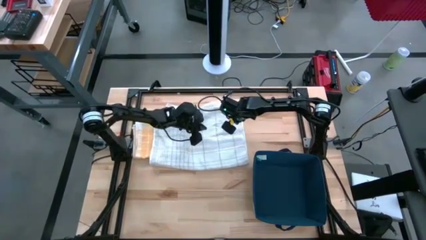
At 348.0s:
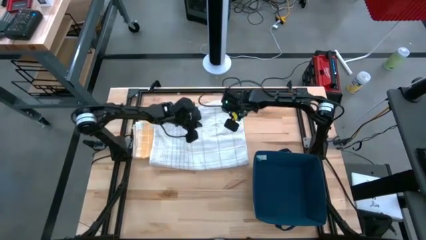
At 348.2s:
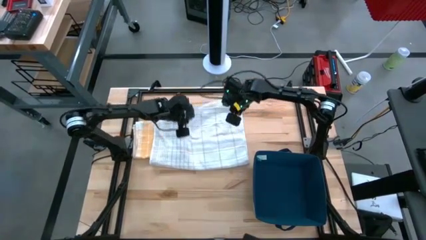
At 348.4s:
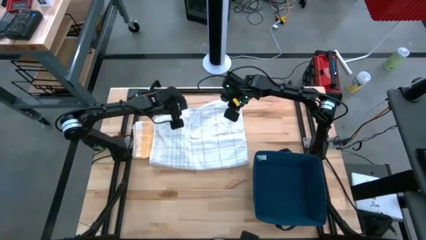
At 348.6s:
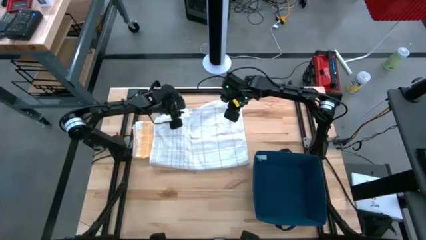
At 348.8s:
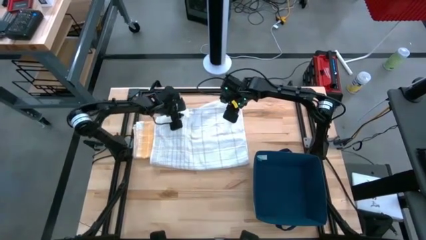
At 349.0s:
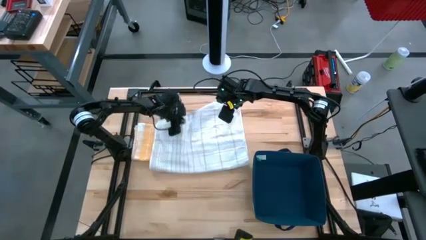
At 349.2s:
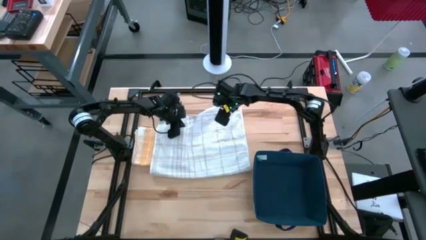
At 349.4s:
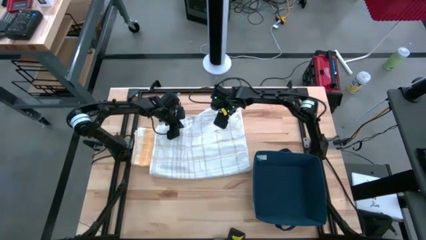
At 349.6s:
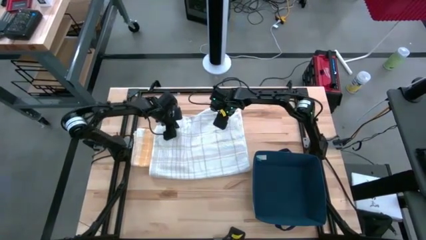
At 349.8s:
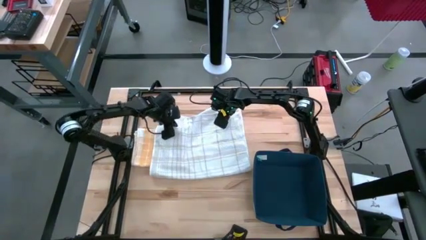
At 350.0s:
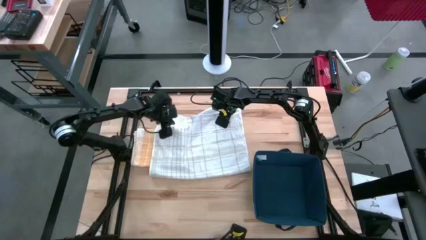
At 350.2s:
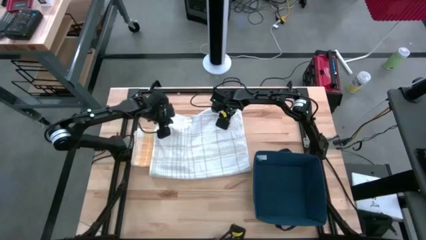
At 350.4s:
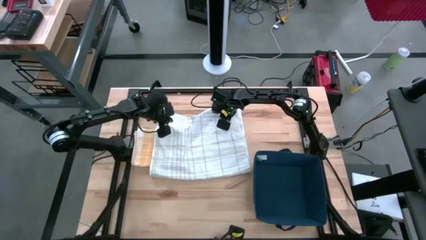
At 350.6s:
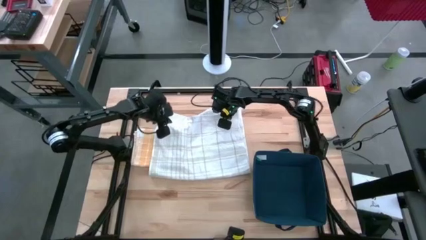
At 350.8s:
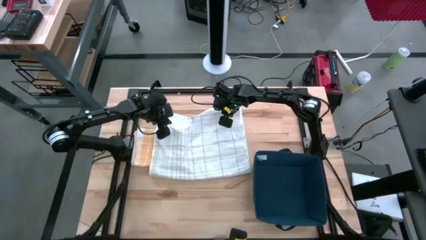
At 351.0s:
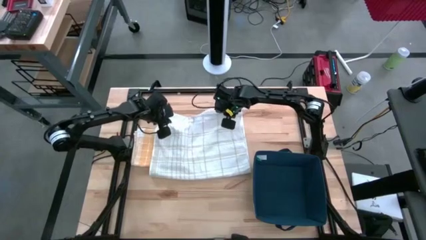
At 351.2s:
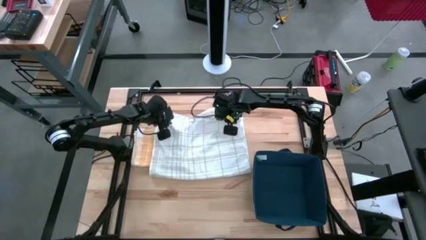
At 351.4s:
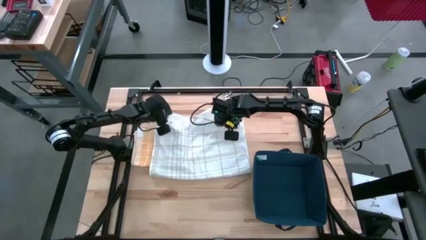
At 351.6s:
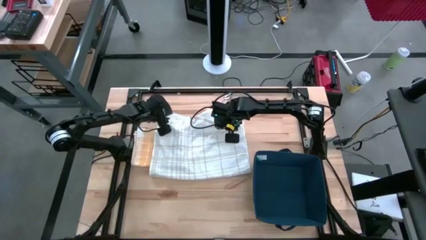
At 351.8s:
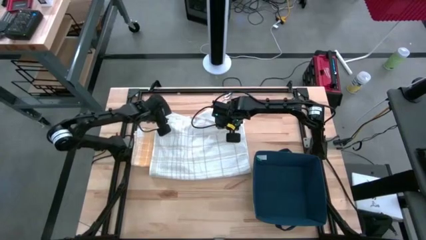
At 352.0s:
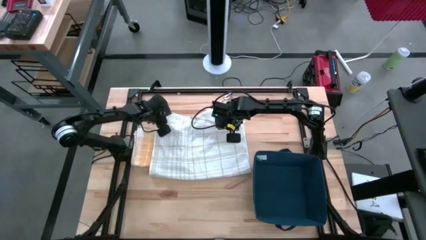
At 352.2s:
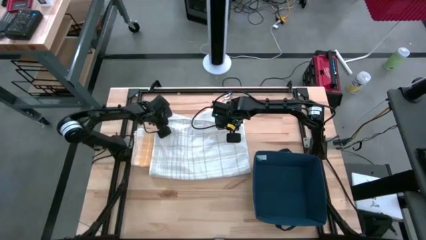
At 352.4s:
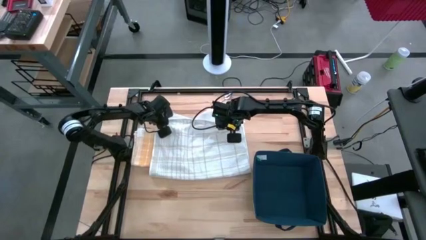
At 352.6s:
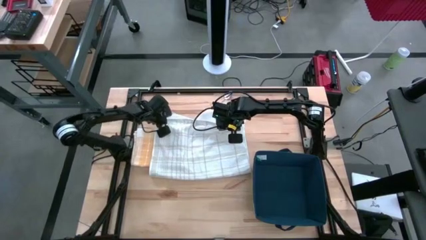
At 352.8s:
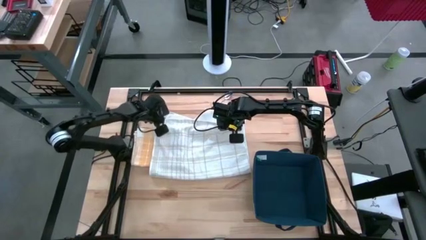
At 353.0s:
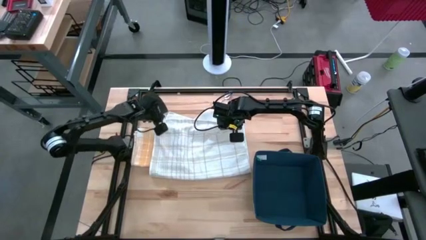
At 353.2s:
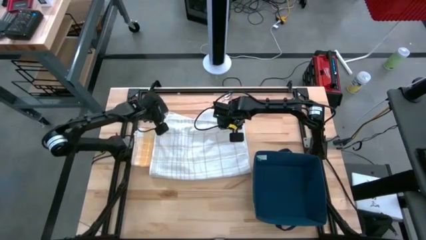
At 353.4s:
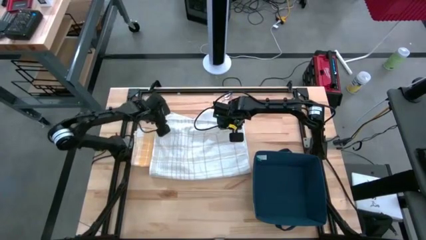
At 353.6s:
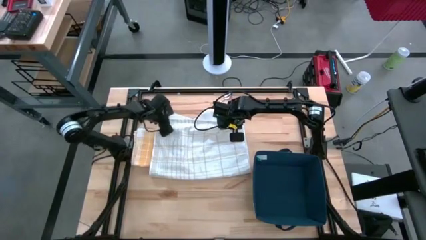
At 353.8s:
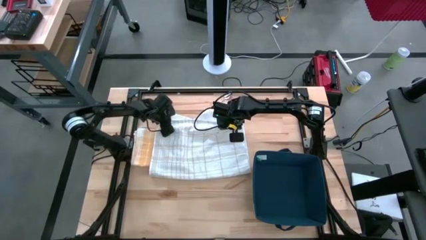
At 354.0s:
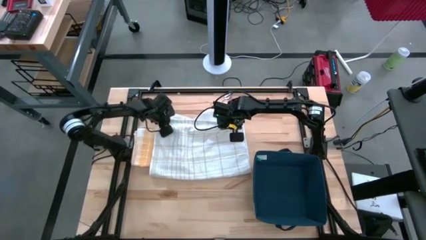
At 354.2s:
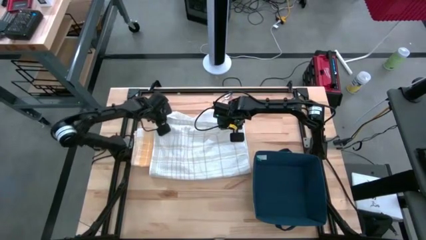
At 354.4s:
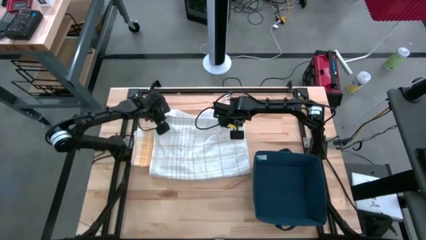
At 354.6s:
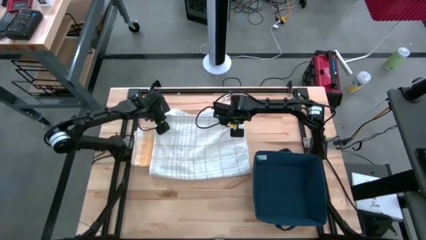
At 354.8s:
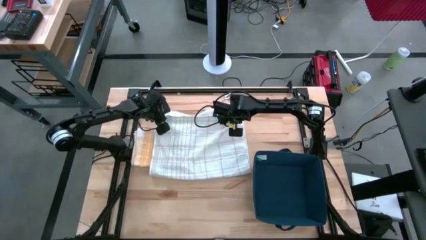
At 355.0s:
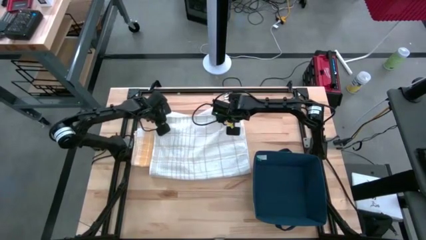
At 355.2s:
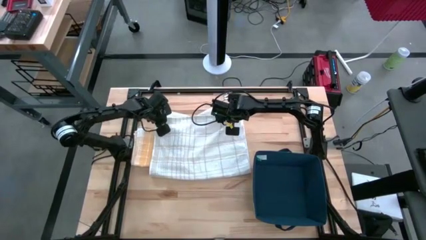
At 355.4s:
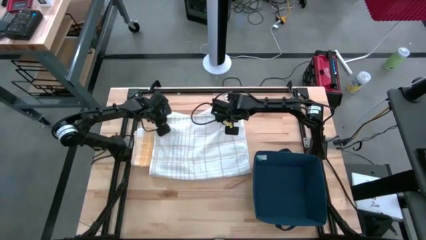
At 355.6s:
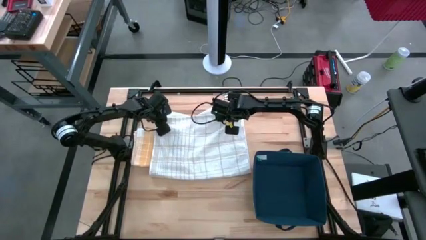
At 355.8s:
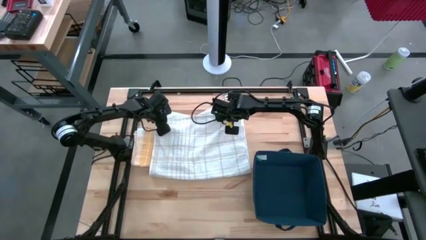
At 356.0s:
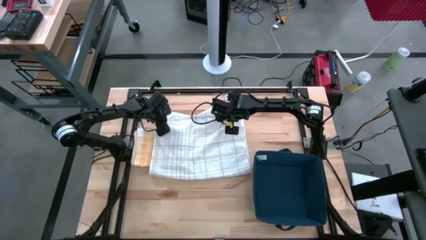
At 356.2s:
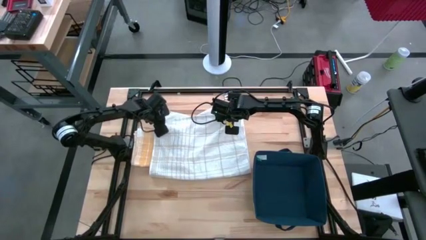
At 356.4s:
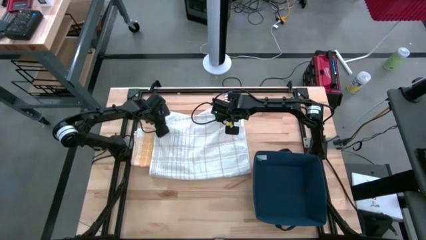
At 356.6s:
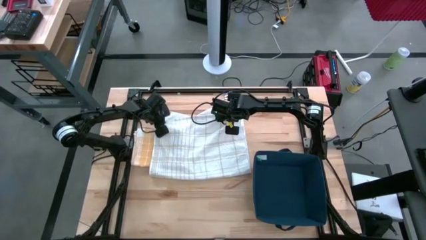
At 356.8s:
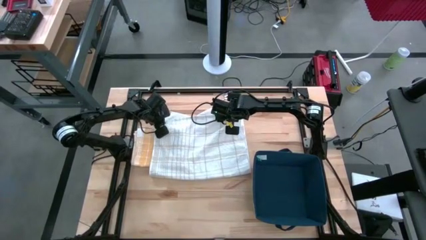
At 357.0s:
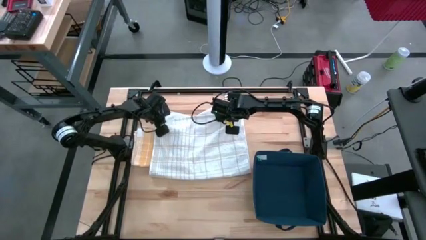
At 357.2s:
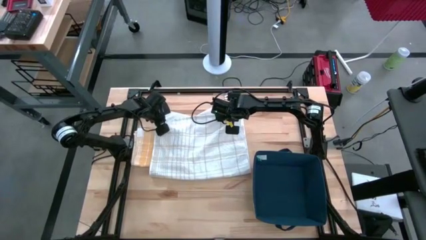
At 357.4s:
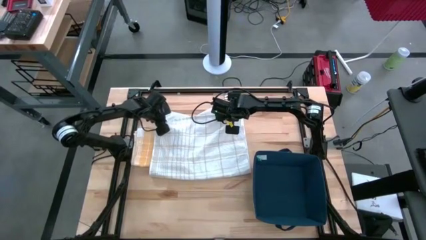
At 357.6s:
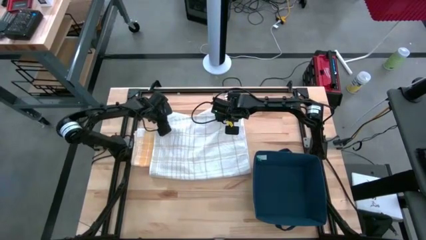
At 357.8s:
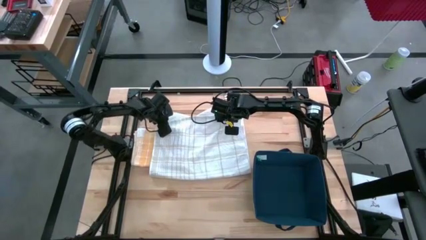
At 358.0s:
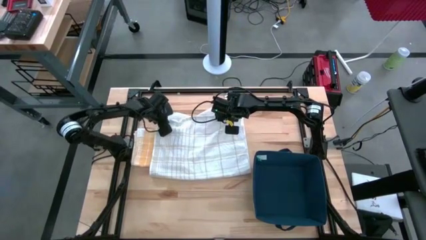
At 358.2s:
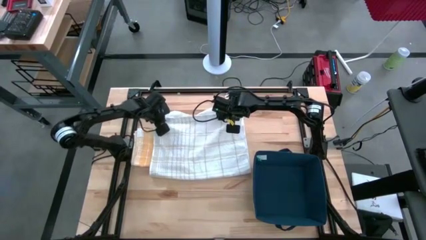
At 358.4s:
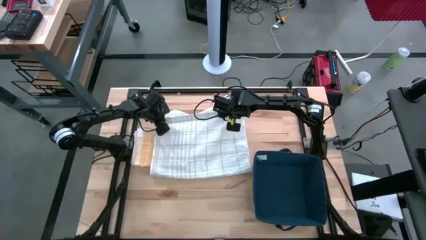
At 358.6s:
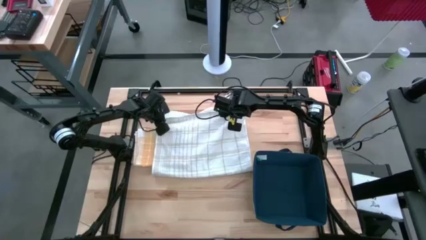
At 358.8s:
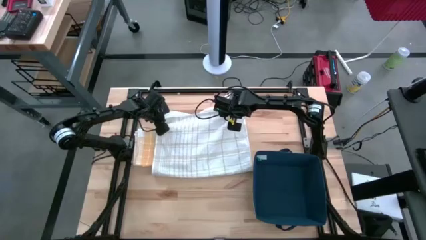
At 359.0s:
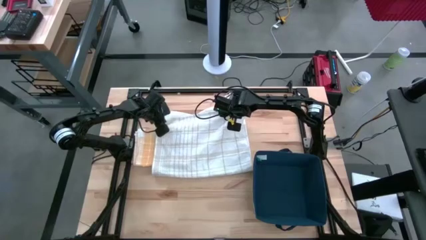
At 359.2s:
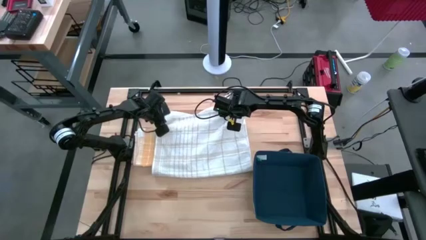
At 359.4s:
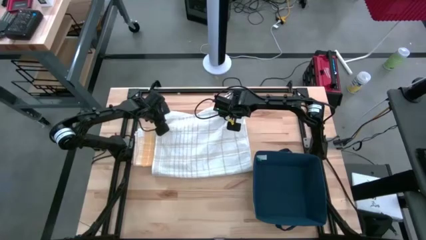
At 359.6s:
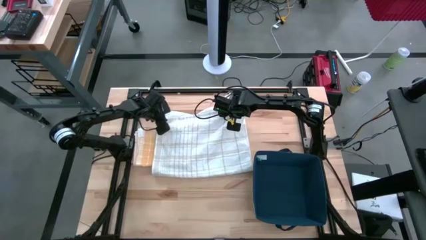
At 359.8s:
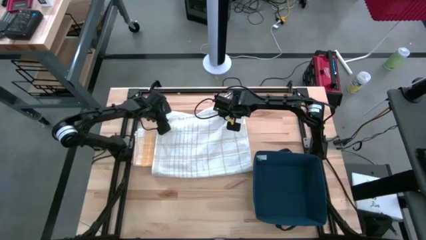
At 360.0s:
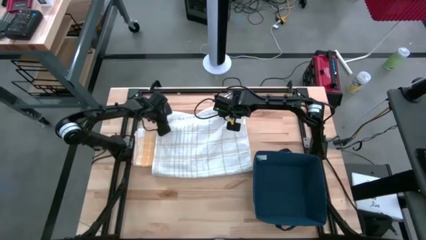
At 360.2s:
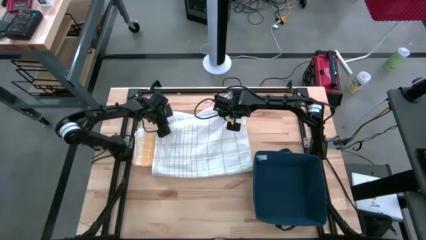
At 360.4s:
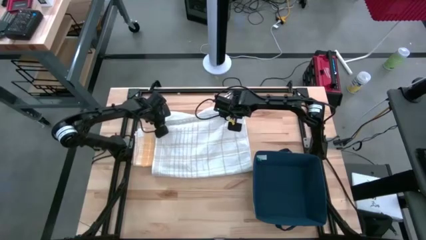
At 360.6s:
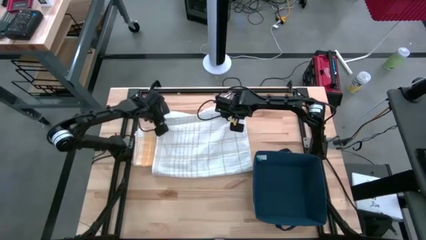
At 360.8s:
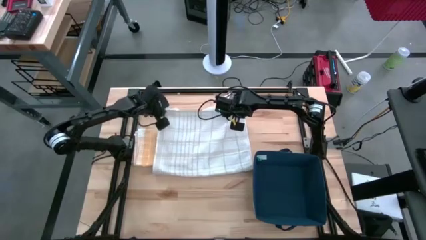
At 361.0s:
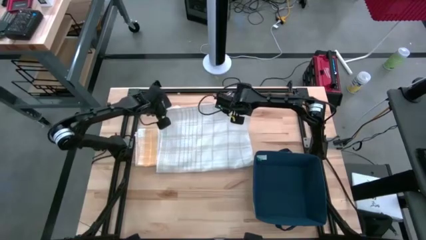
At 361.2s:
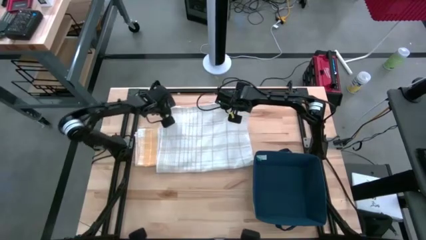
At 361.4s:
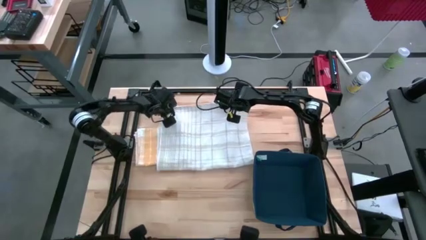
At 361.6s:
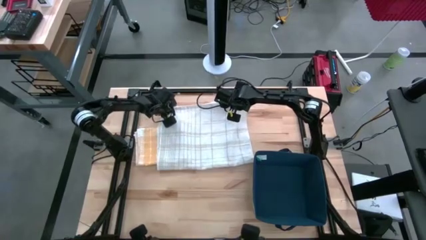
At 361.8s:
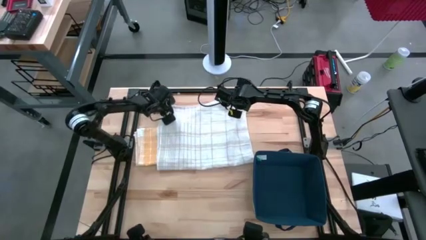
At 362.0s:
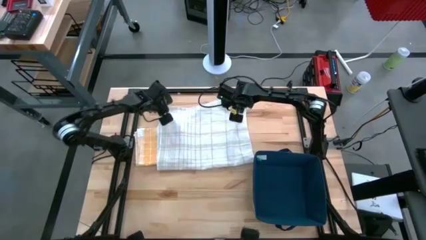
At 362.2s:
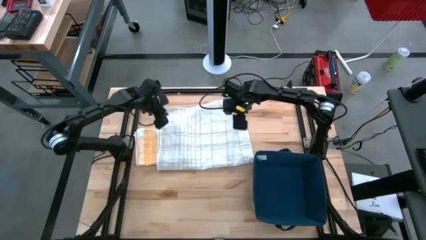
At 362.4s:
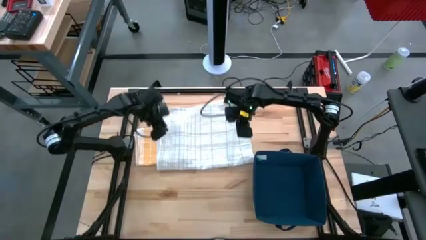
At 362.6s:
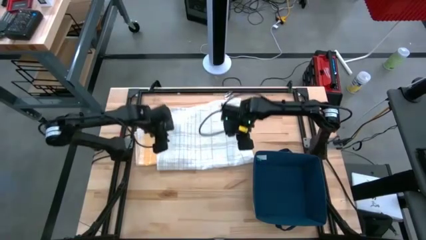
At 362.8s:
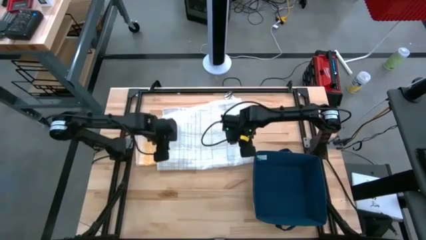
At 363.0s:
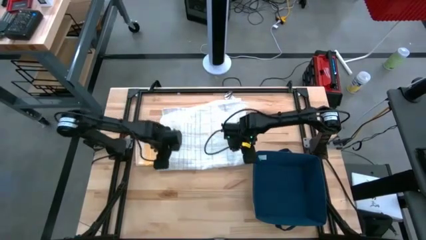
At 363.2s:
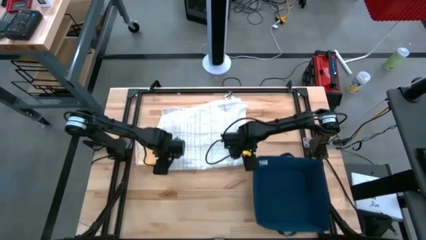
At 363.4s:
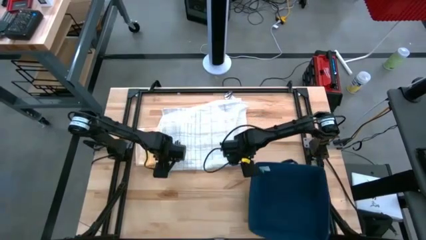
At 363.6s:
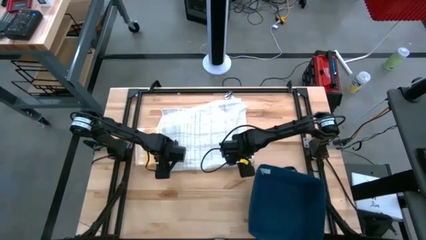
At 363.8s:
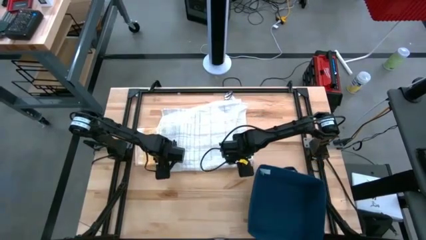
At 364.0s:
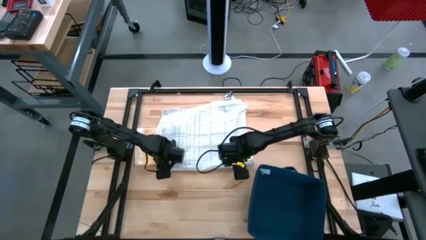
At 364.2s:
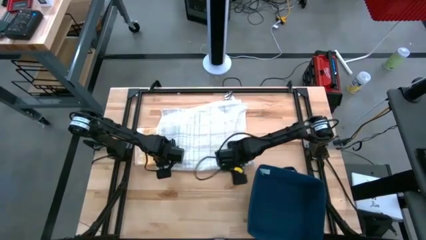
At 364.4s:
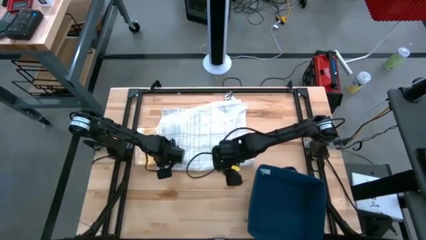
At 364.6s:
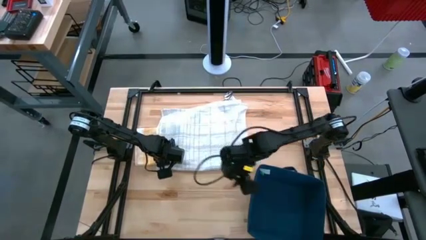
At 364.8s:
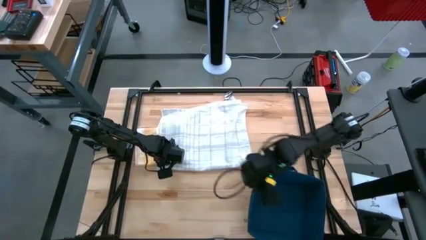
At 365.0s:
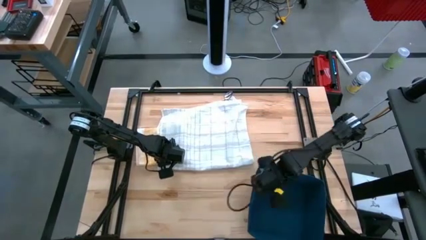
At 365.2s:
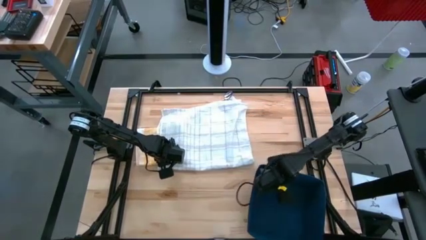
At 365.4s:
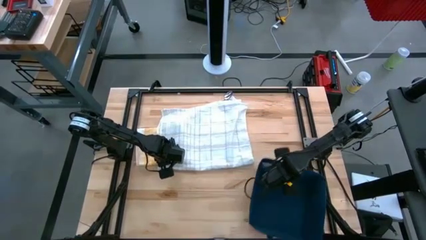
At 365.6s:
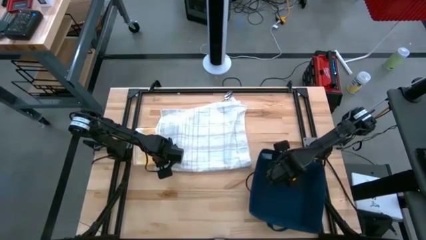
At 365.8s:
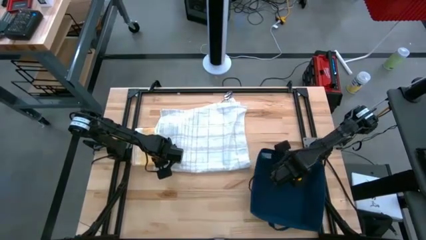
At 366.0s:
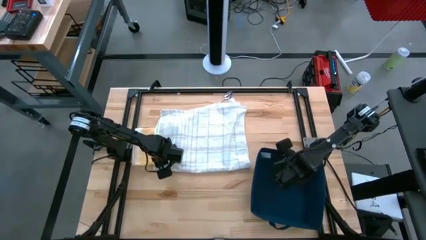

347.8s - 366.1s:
Task: Fold towel
Fold the white towel
